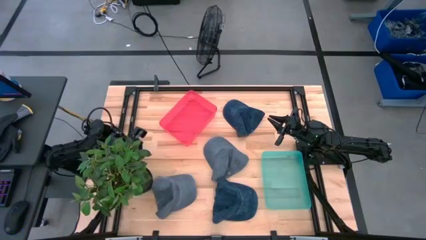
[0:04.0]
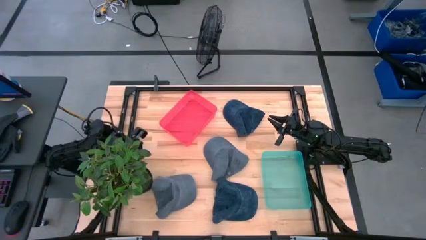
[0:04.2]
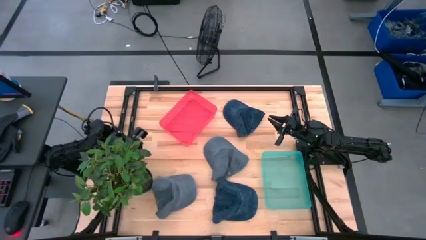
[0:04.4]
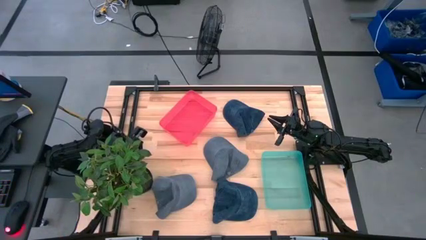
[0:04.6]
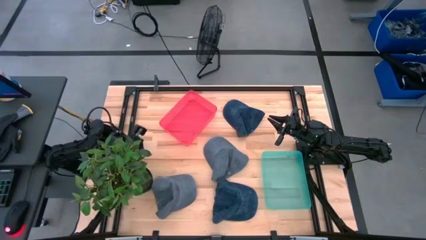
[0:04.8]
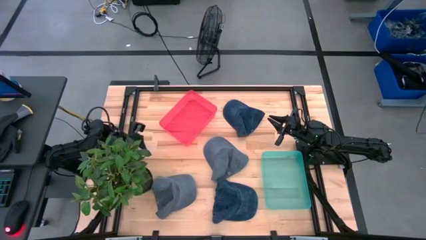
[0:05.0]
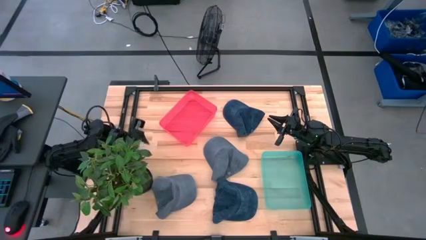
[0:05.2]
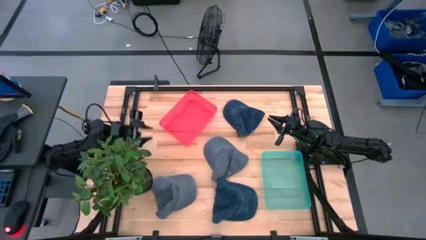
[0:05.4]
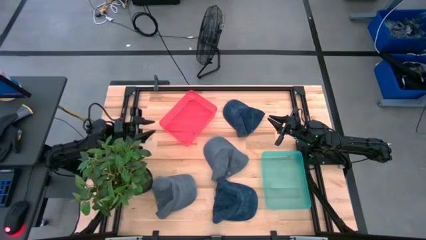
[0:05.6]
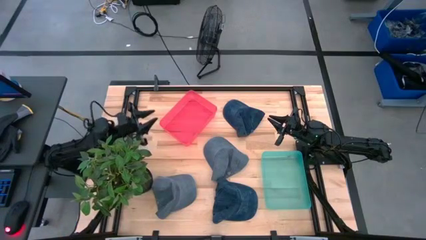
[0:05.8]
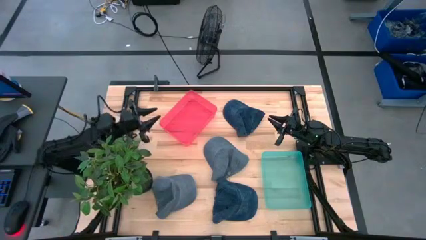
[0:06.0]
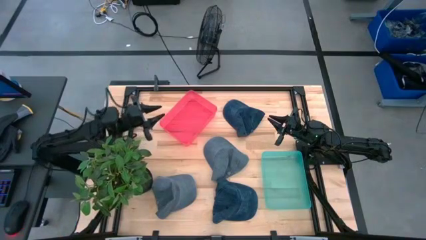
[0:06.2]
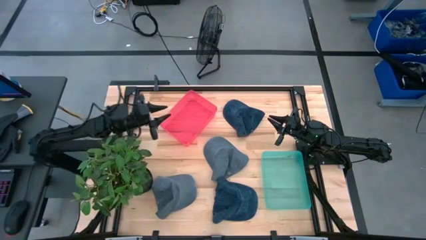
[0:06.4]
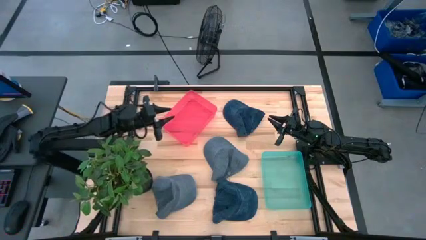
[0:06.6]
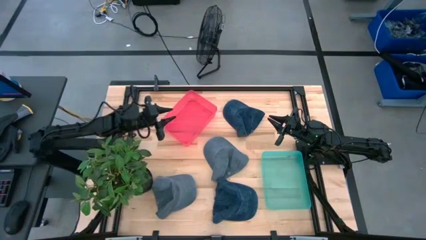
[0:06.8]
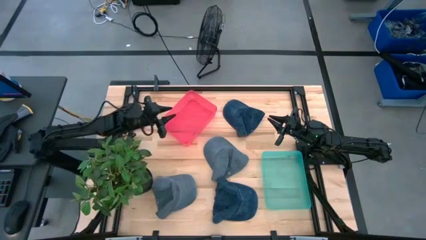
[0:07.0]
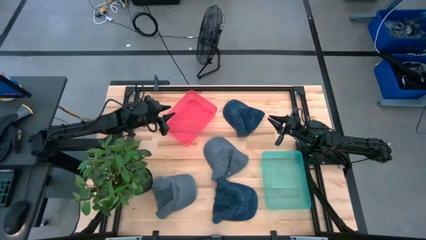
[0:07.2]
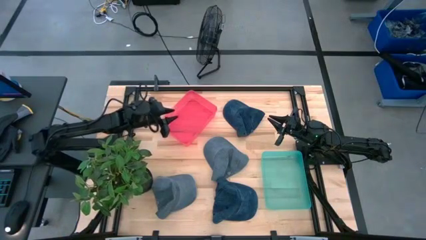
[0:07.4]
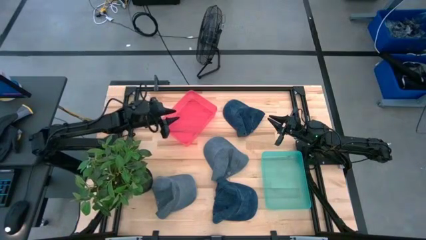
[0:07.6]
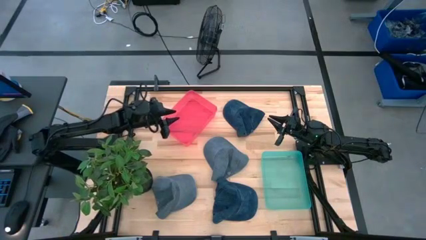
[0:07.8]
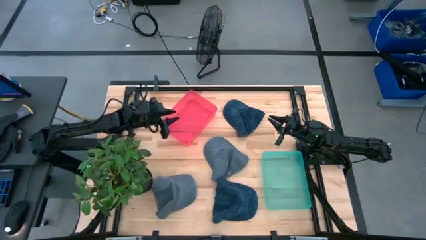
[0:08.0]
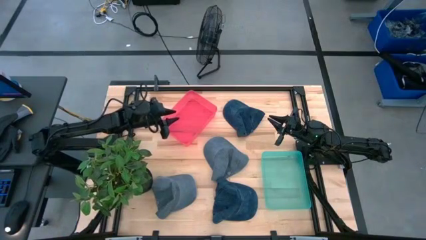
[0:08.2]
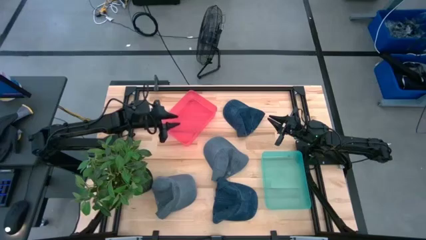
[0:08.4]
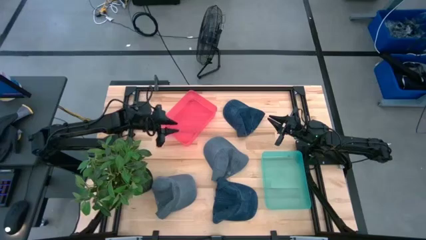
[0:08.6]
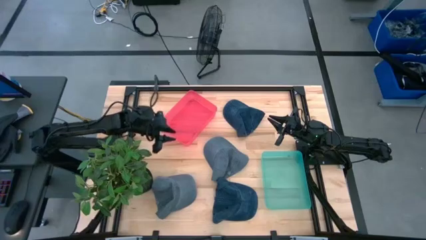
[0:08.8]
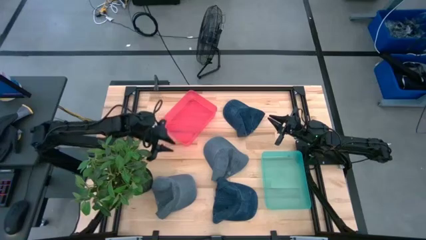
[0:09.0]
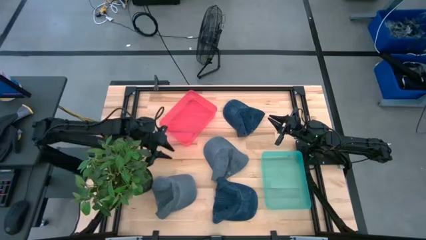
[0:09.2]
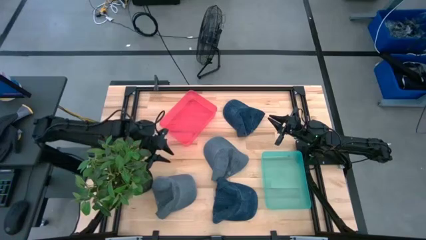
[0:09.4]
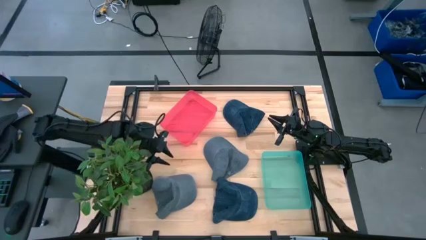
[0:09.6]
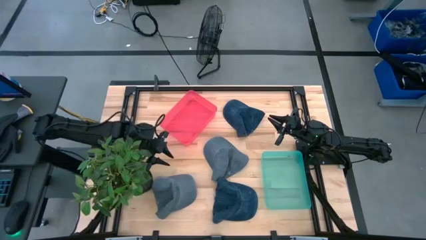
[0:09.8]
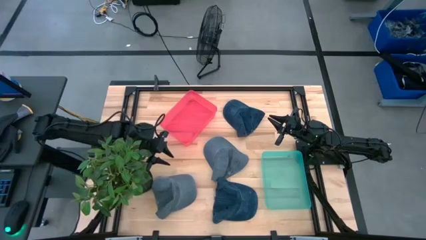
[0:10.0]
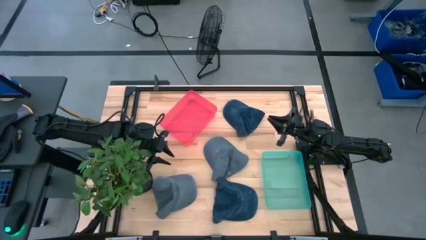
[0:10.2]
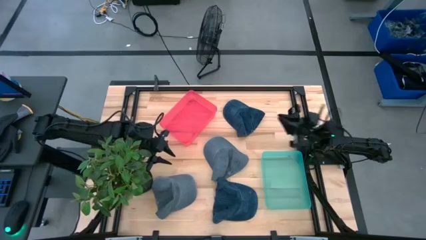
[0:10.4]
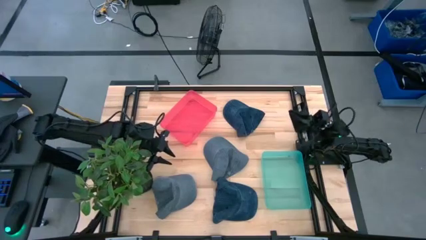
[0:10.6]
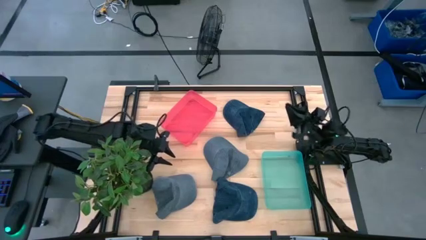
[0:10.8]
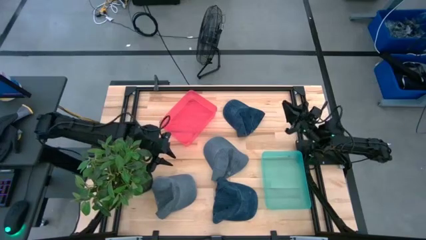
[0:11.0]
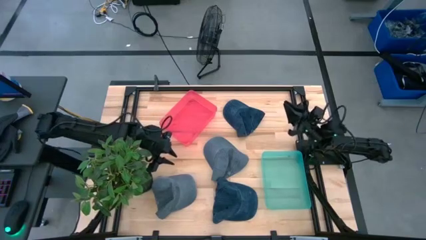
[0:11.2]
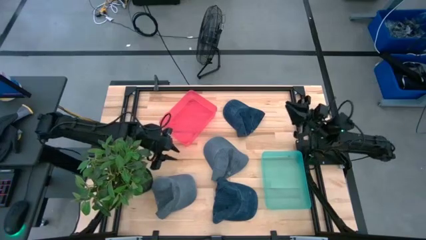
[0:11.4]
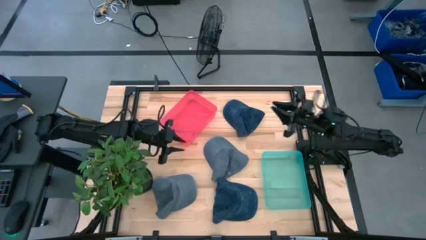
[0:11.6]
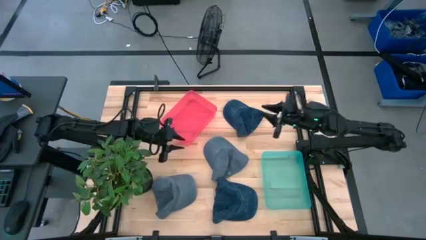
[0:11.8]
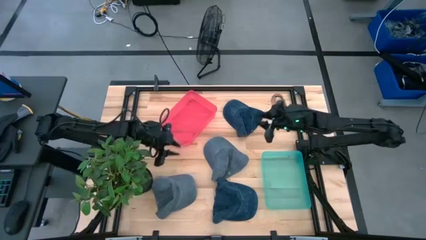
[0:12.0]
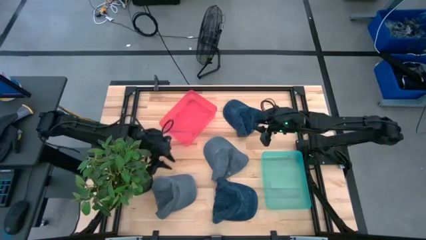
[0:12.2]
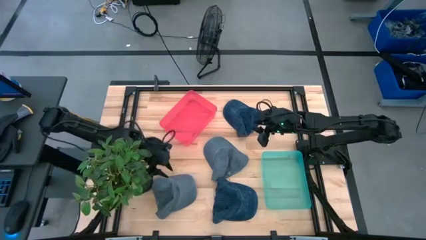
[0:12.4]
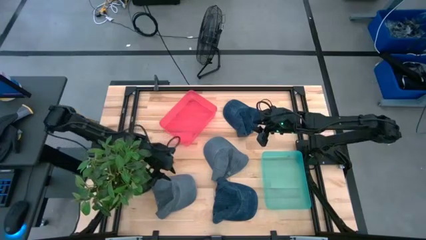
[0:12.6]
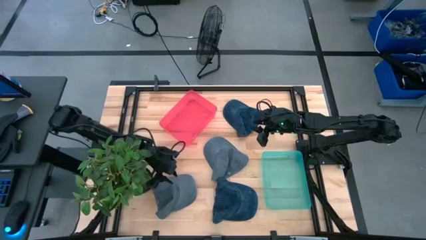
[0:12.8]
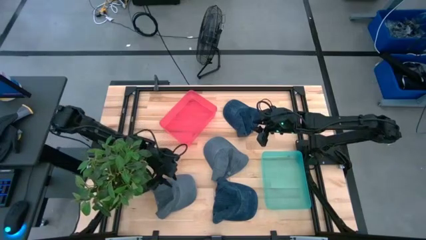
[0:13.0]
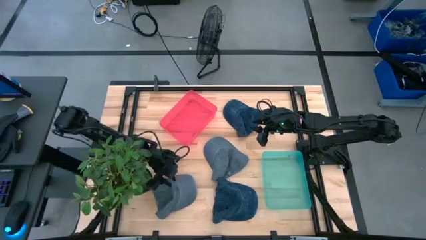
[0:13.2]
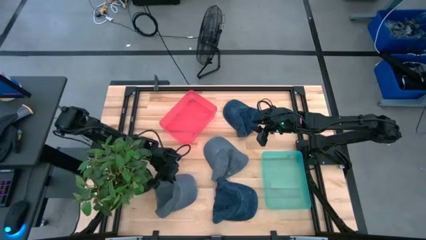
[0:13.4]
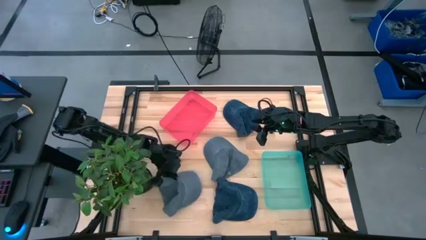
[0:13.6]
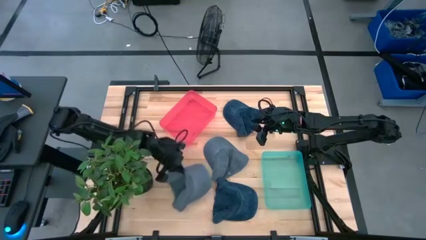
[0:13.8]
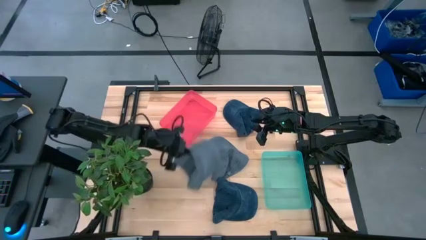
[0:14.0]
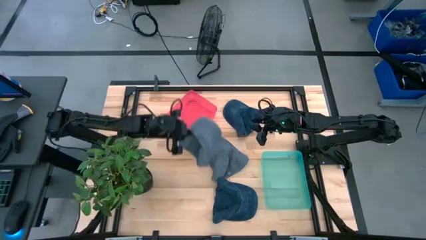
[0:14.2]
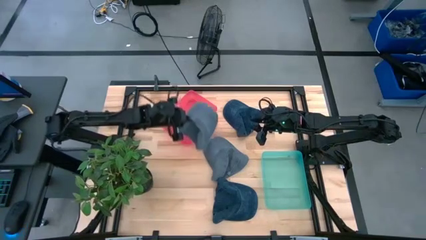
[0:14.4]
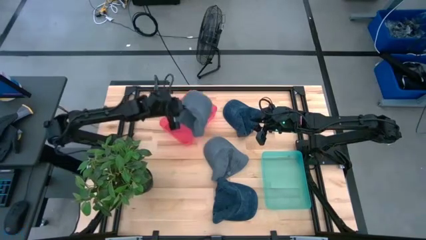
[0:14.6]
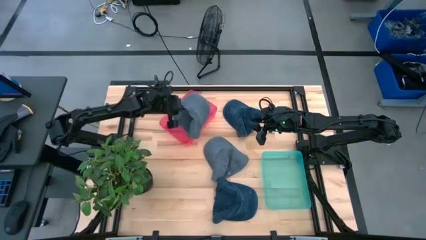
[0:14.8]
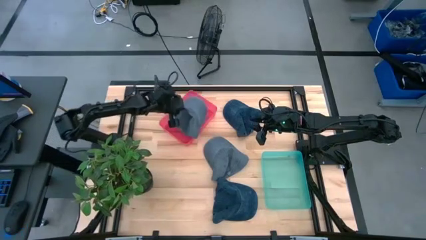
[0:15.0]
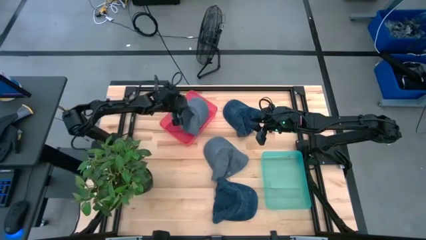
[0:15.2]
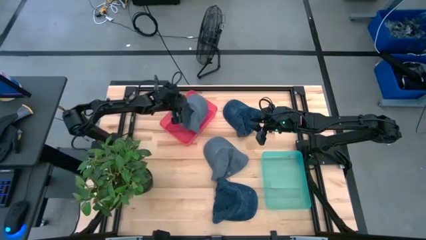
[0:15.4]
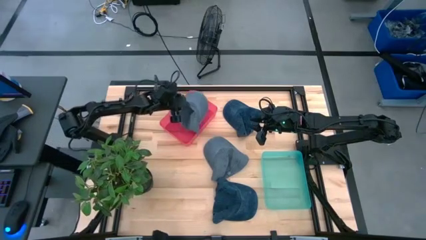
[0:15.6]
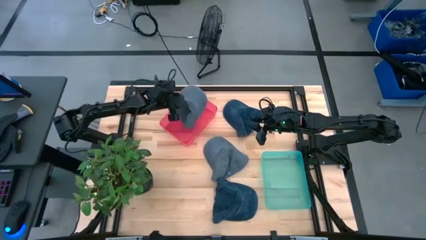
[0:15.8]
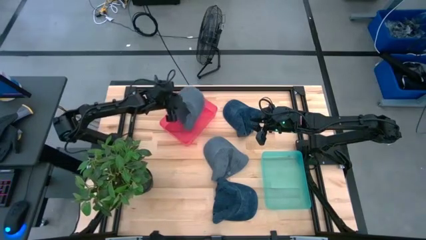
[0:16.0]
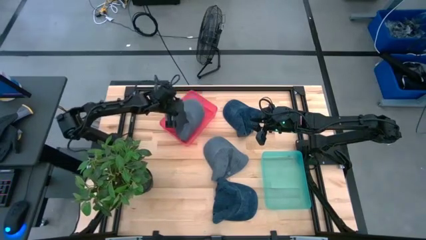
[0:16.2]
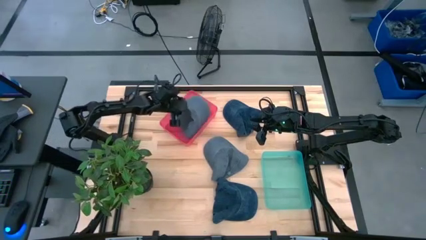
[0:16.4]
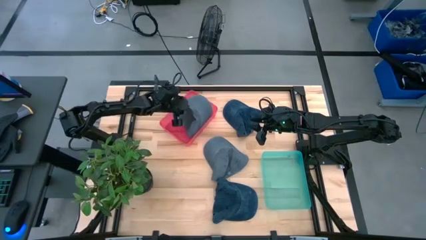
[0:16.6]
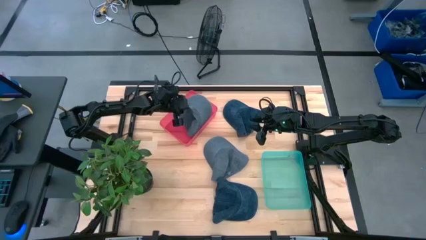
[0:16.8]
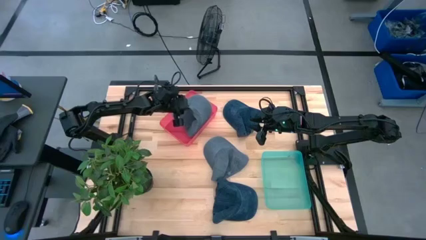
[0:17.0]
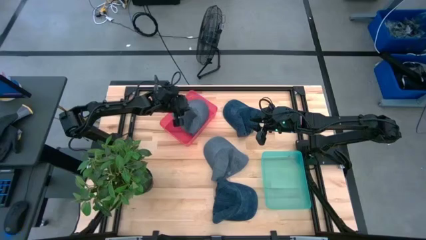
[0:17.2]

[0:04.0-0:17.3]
Task: Pick & Place hat
Put the left gray cap into the red bin
